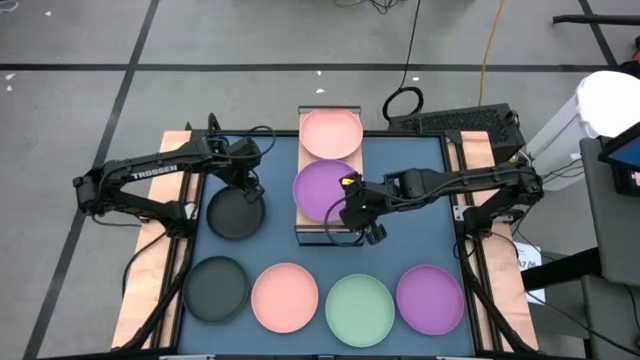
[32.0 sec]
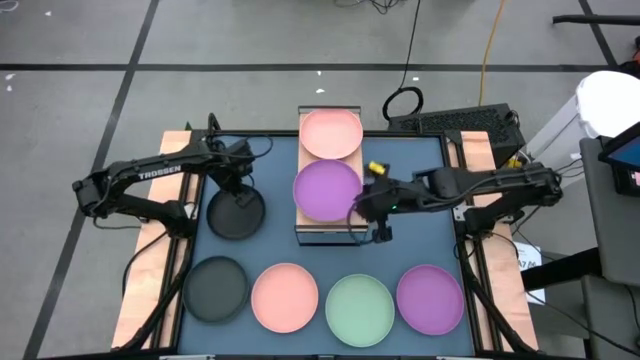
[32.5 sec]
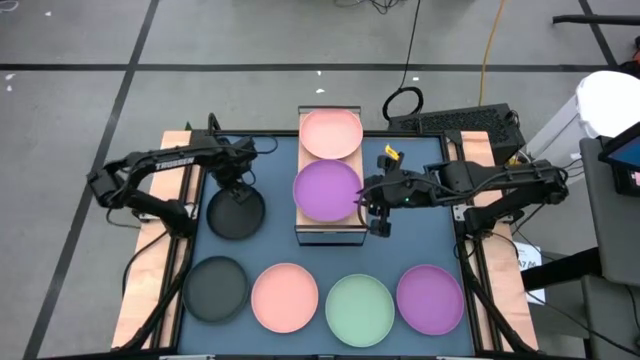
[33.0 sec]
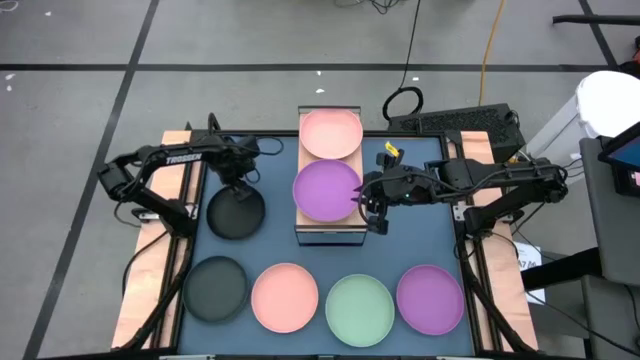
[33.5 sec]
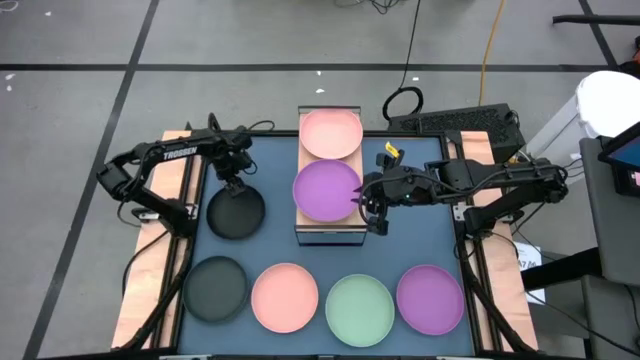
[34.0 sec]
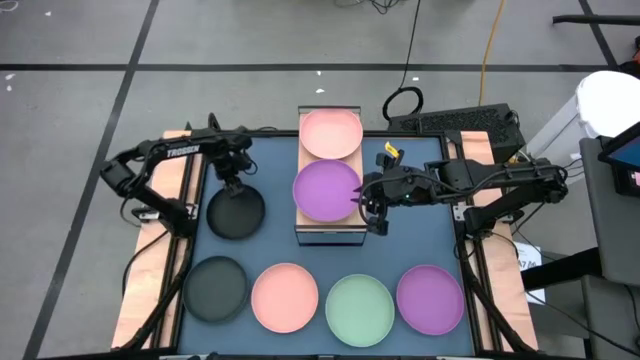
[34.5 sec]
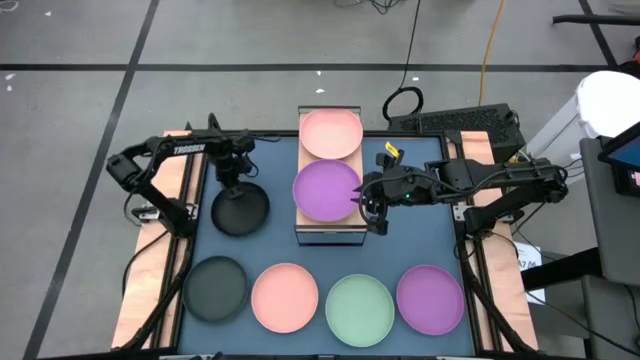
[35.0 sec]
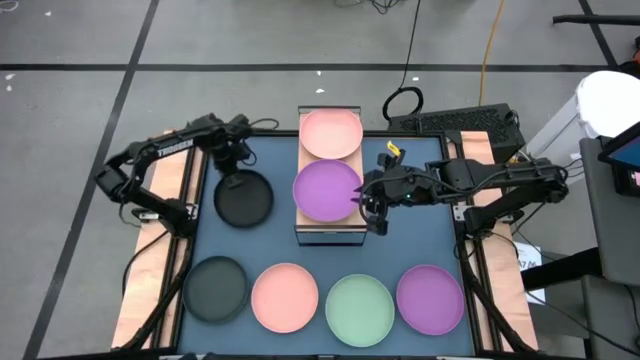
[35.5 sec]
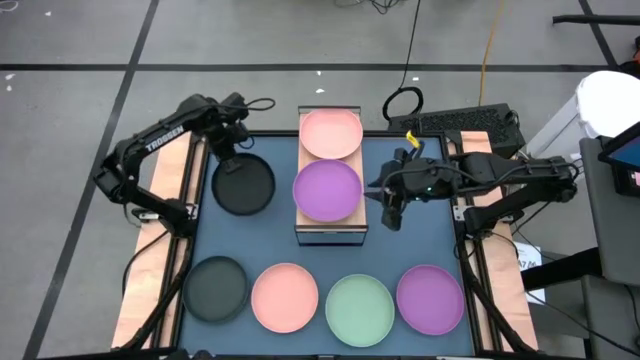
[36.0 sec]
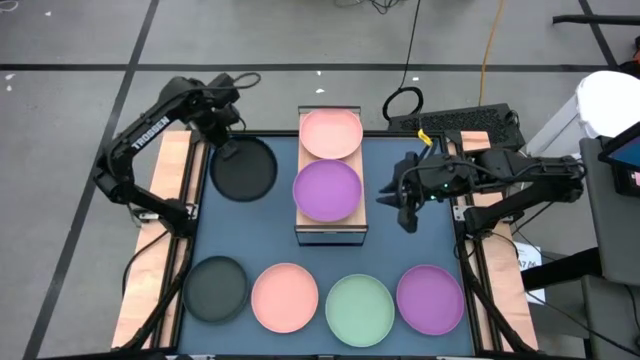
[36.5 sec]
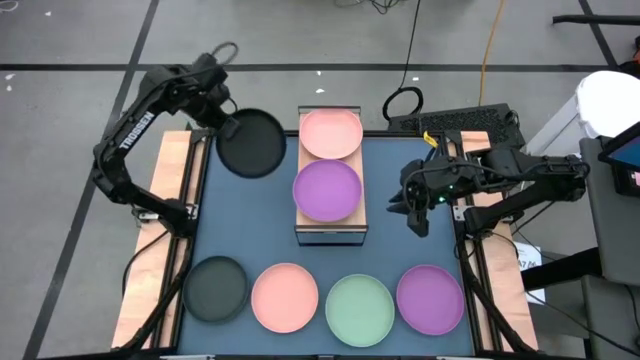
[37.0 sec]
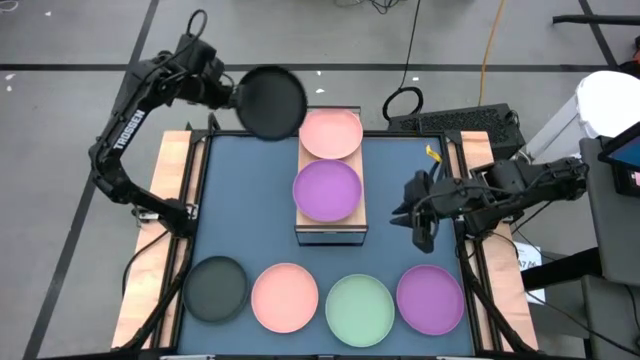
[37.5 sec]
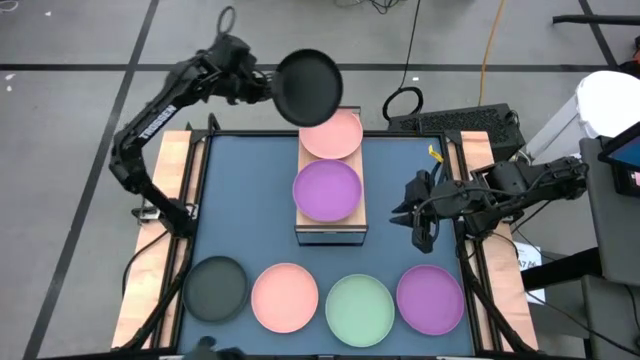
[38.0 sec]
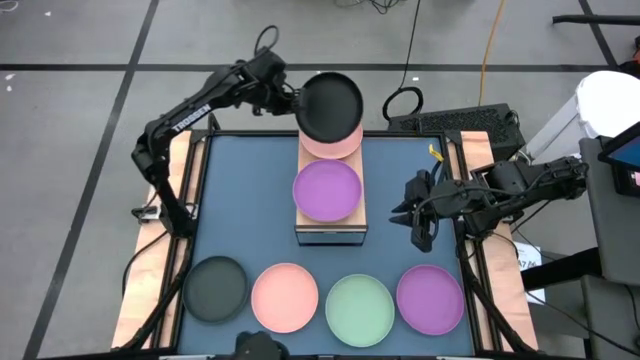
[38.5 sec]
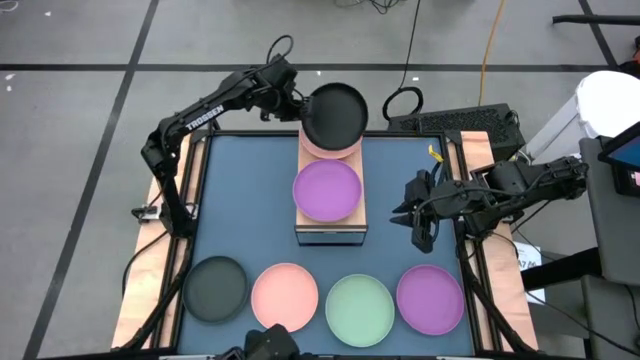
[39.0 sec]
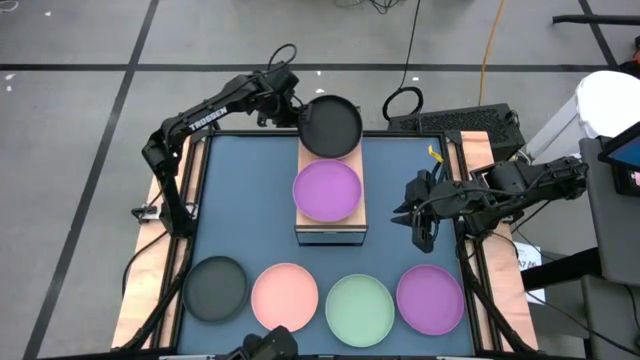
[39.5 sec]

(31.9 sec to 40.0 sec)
Task: Place and stack plates onto a shelf
Stack the top black plate on top of the orange plate on the shelf

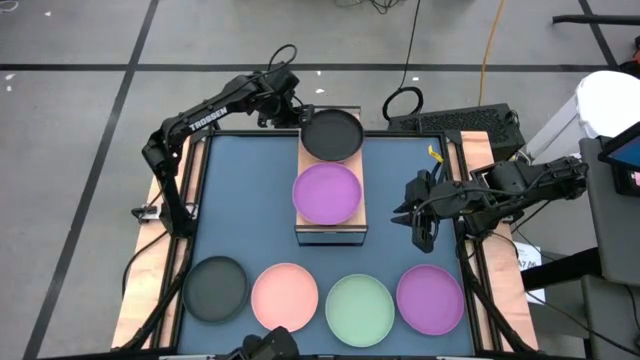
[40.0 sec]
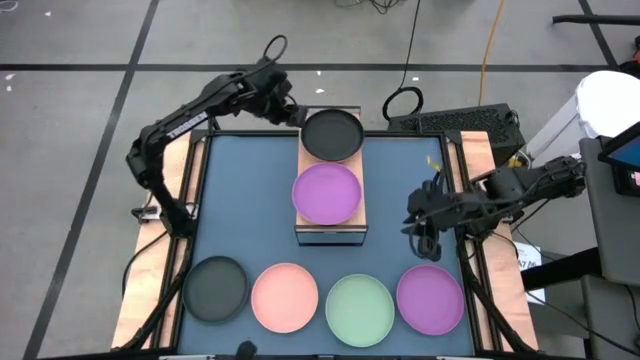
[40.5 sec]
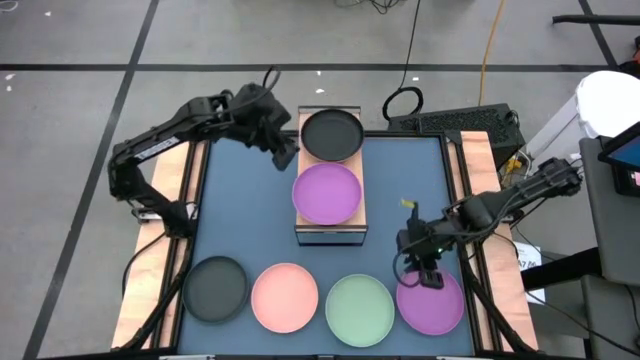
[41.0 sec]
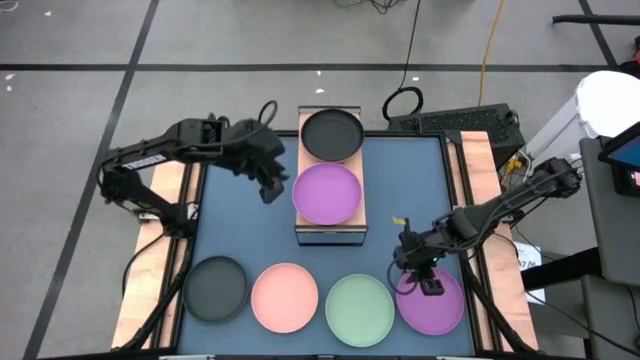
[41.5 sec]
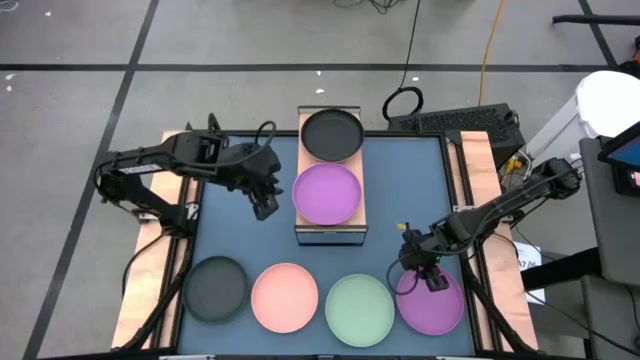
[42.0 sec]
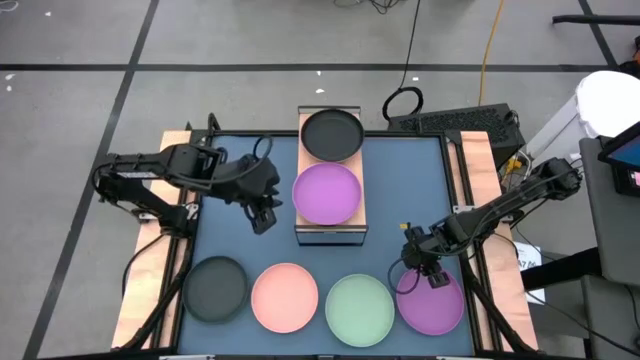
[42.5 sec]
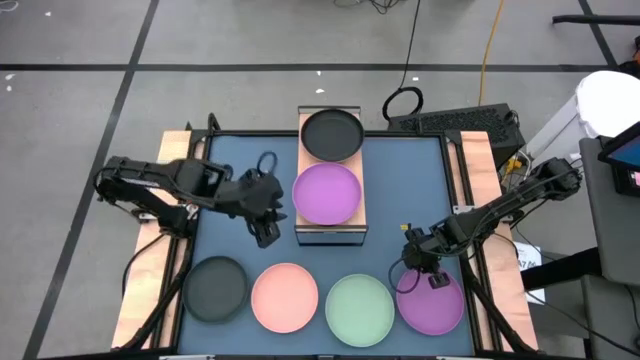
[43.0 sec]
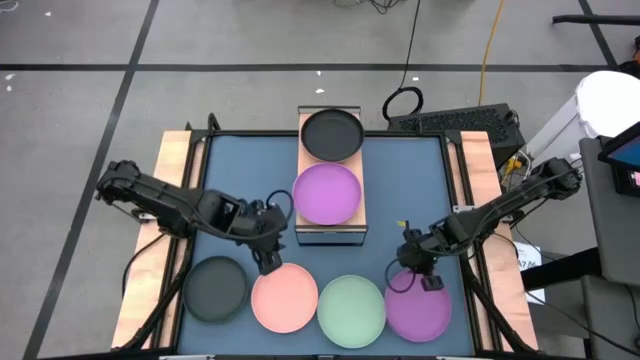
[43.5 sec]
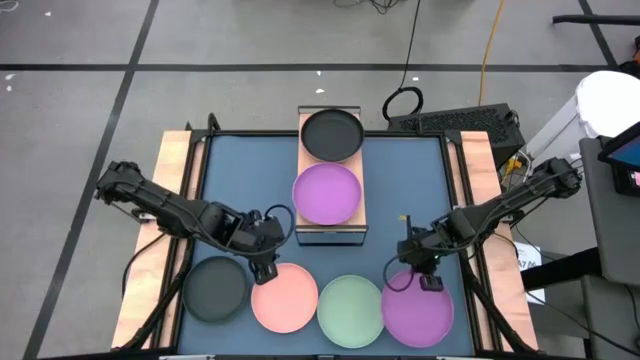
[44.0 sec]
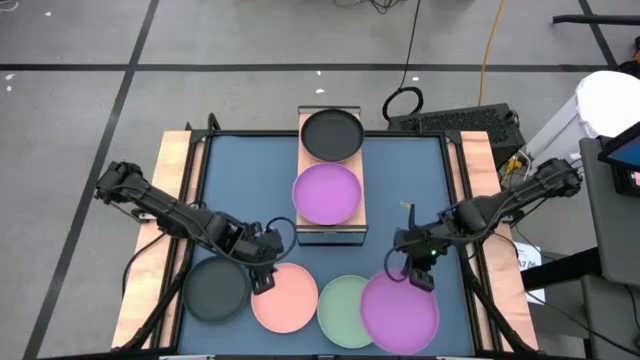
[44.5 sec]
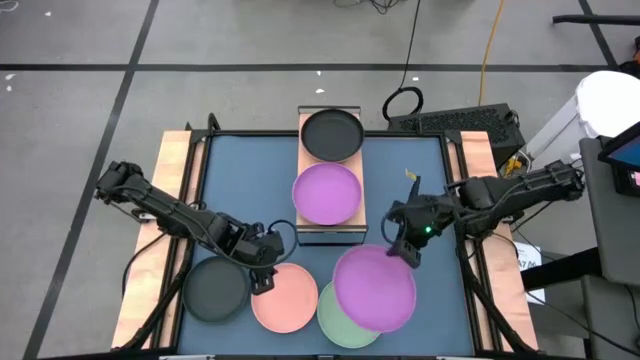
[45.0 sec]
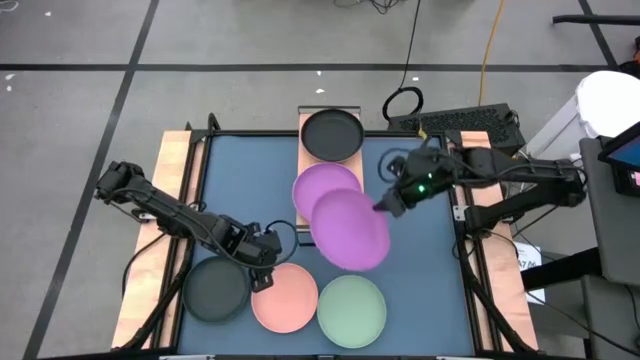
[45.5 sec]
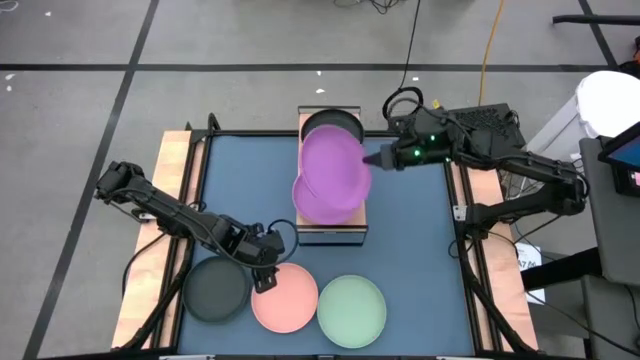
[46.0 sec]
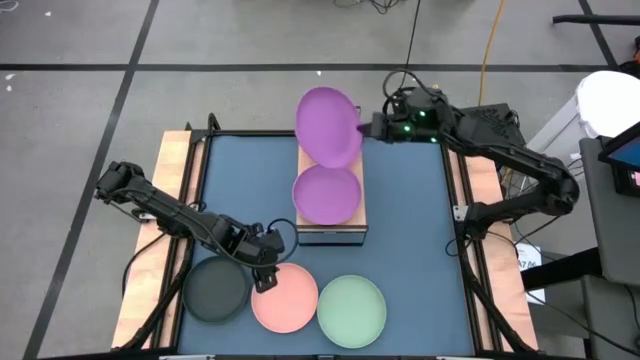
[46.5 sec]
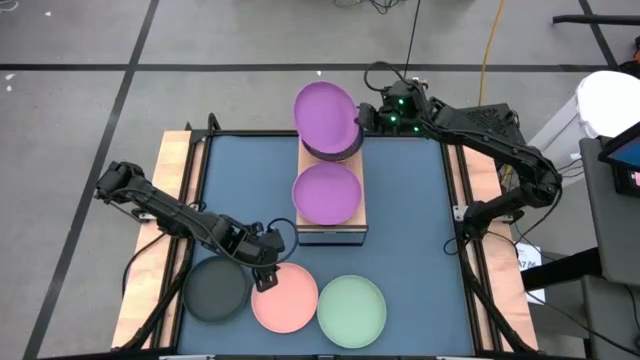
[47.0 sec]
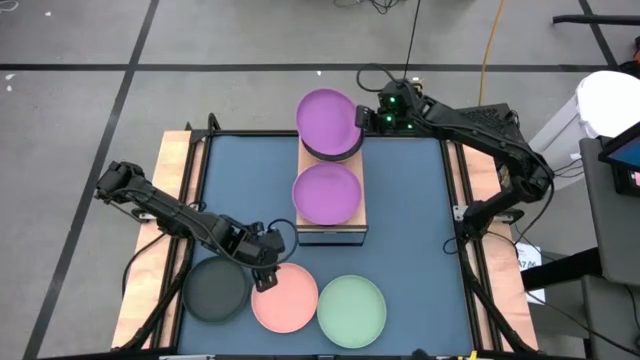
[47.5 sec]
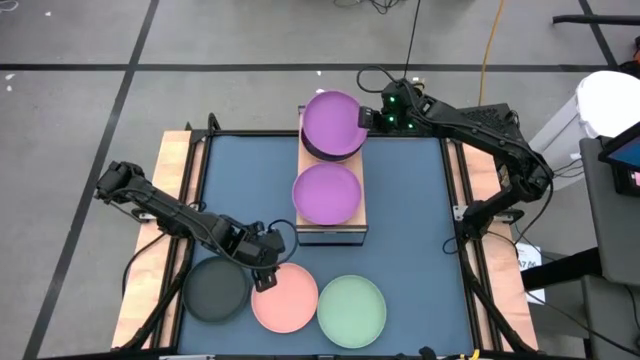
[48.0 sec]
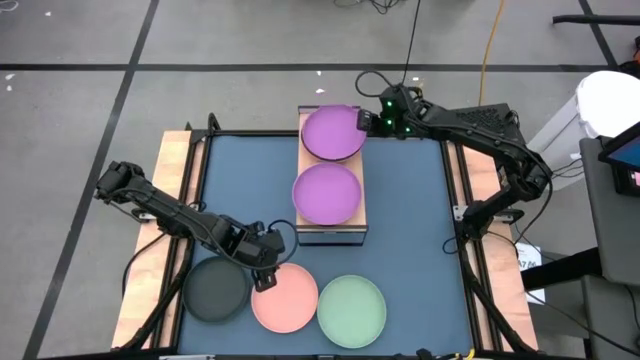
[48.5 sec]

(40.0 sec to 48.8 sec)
Stack the purple plate on top of the black plate on the shelf

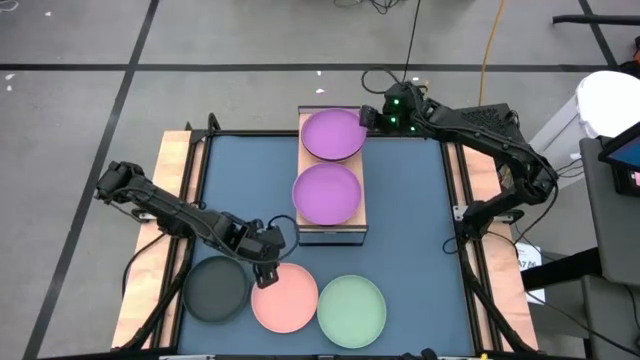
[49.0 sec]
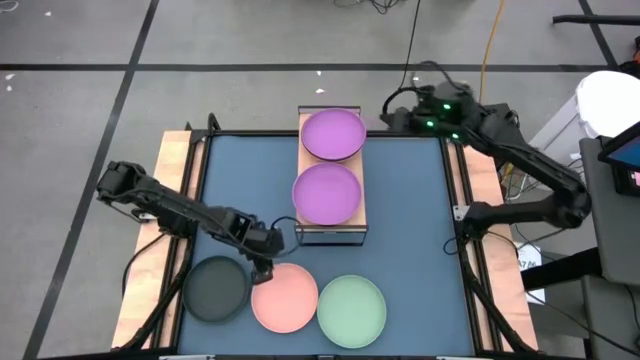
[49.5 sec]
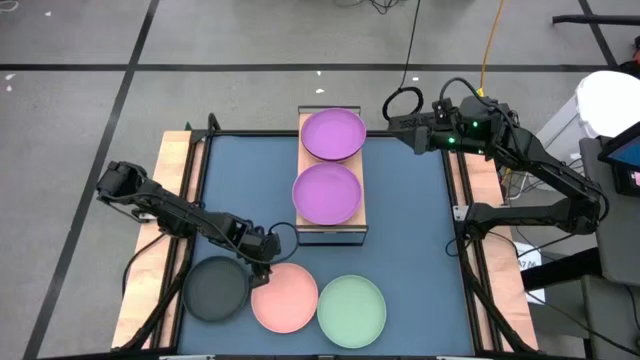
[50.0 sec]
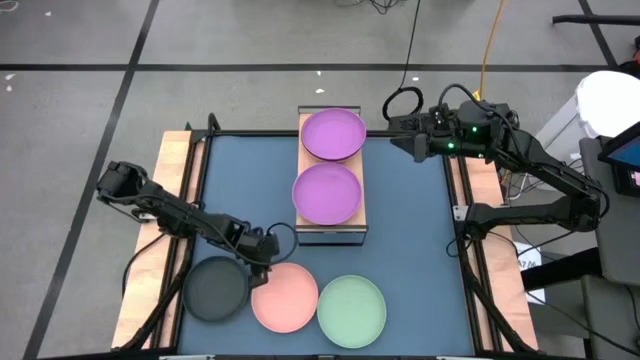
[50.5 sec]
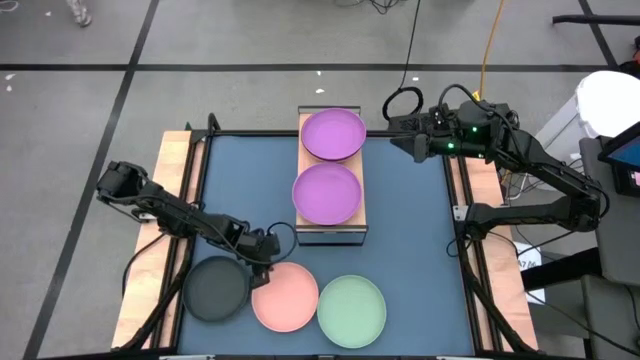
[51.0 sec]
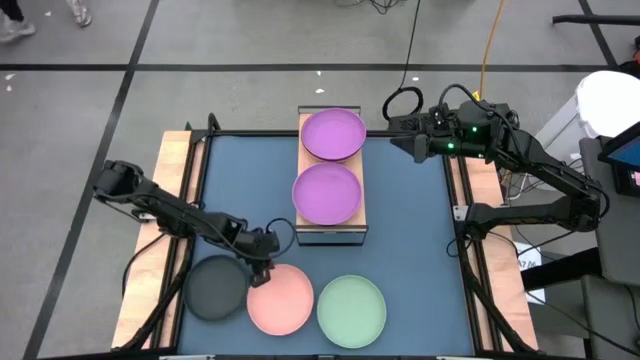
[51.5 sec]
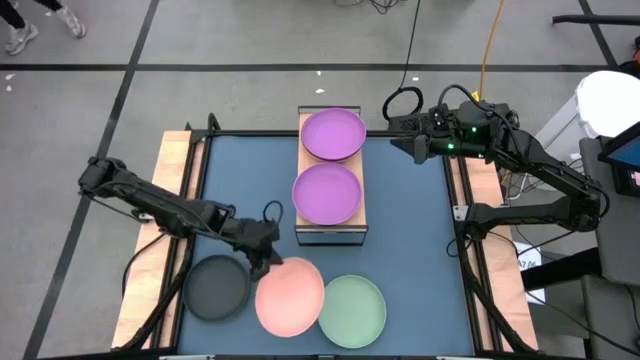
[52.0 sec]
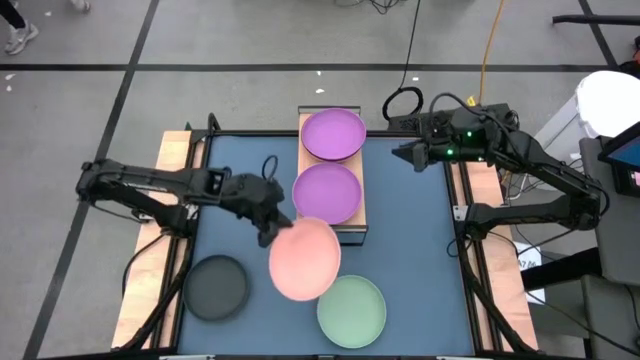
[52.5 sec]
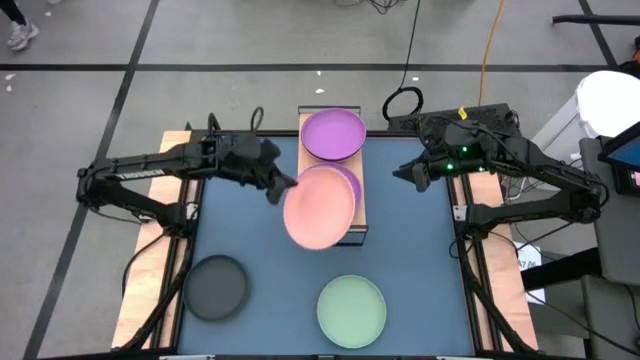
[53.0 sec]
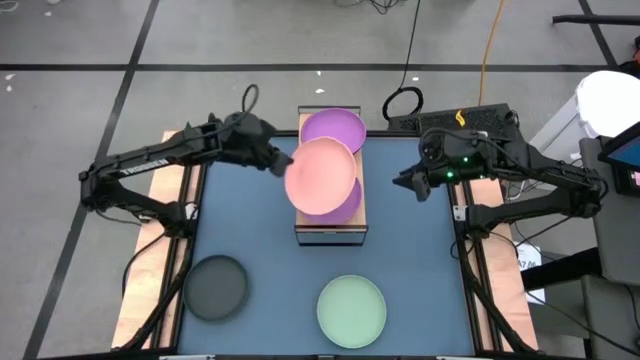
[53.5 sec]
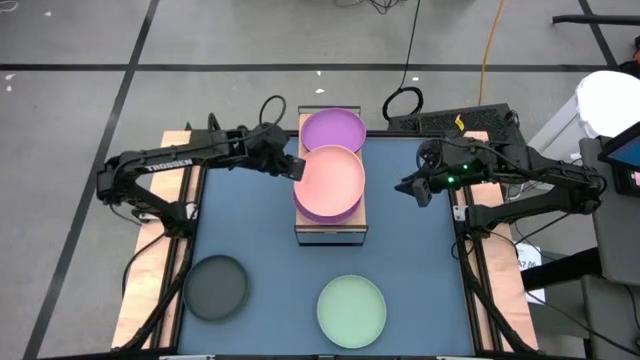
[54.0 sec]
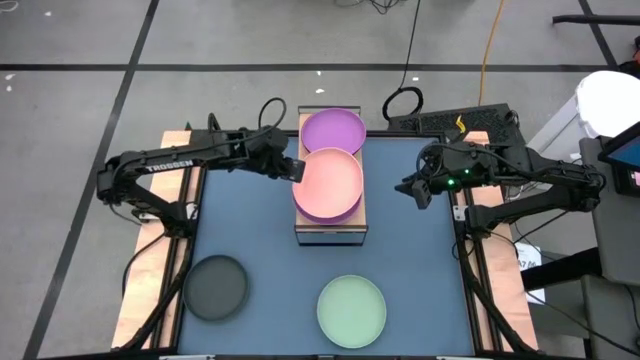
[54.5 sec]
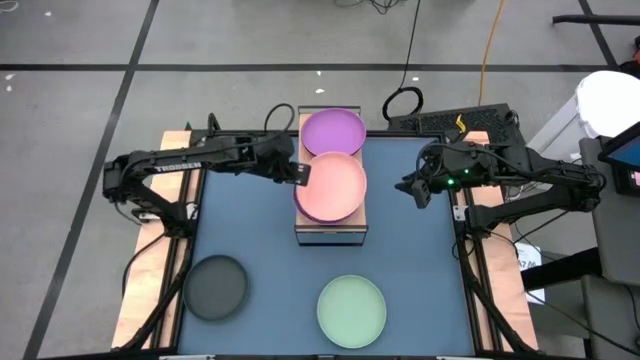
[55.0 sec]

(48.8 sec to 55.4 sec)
Stack the orange plate on top of the purple plate on the shelf
